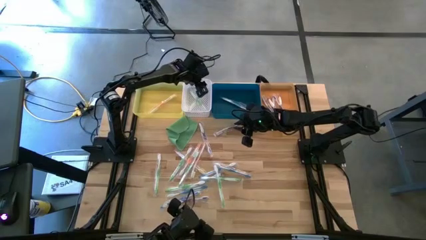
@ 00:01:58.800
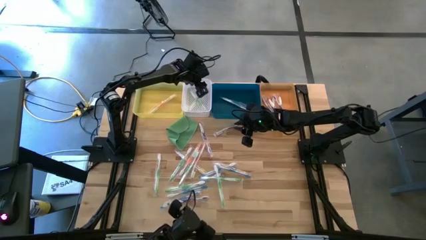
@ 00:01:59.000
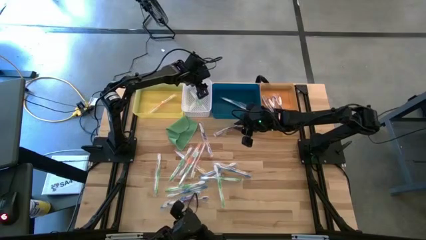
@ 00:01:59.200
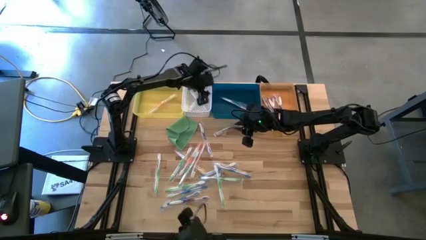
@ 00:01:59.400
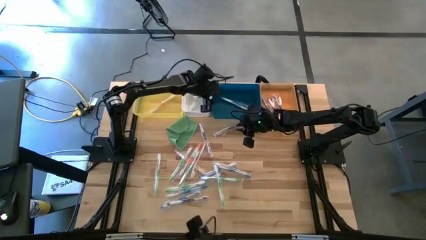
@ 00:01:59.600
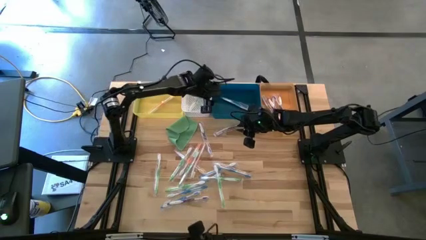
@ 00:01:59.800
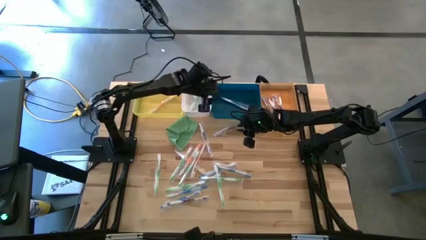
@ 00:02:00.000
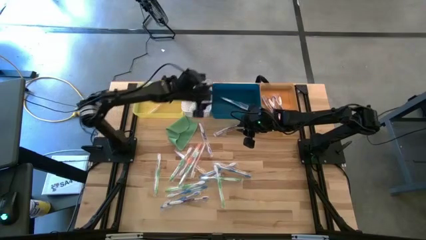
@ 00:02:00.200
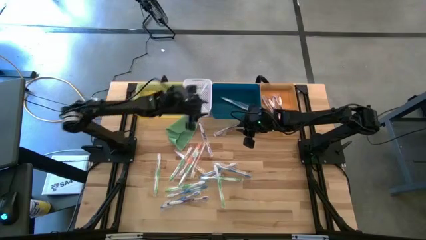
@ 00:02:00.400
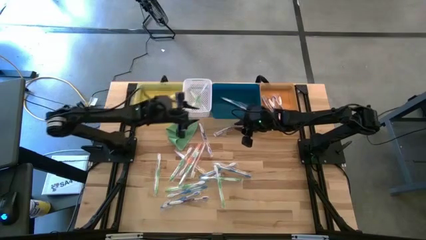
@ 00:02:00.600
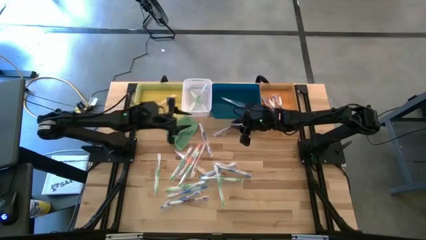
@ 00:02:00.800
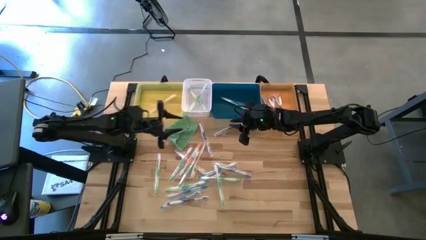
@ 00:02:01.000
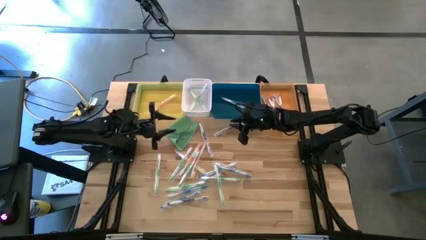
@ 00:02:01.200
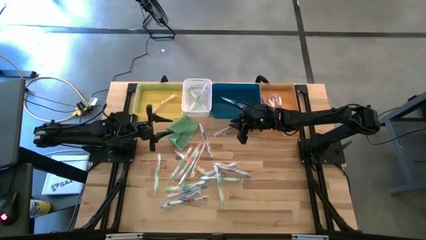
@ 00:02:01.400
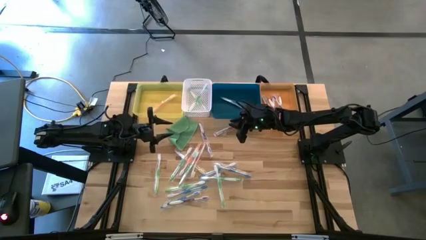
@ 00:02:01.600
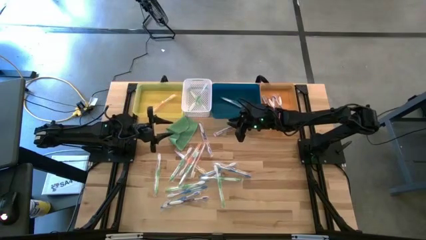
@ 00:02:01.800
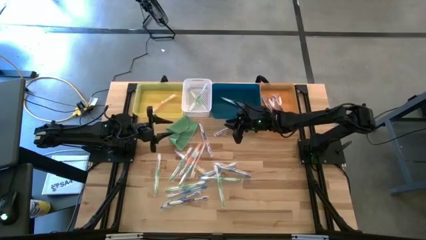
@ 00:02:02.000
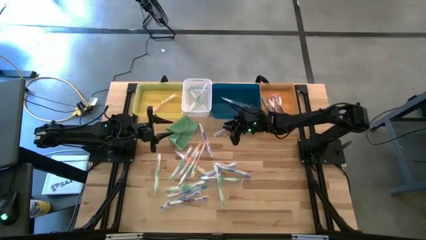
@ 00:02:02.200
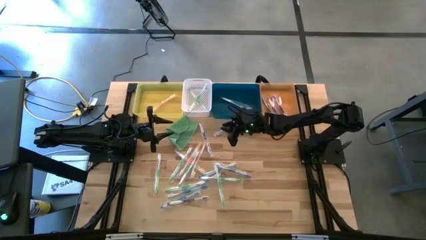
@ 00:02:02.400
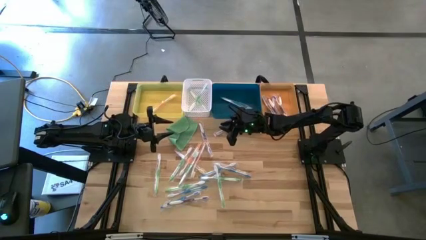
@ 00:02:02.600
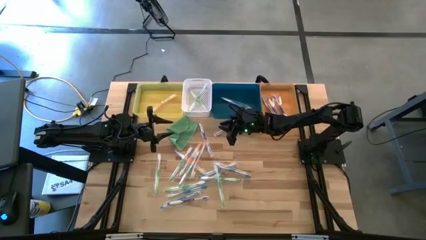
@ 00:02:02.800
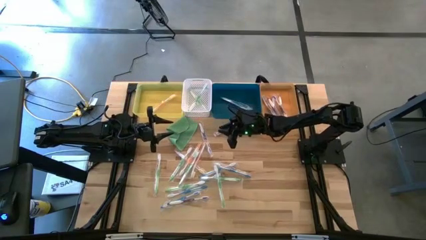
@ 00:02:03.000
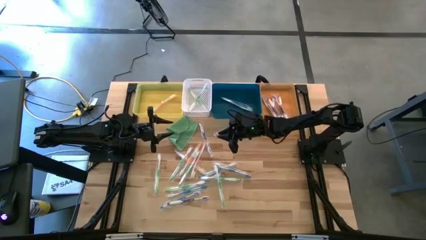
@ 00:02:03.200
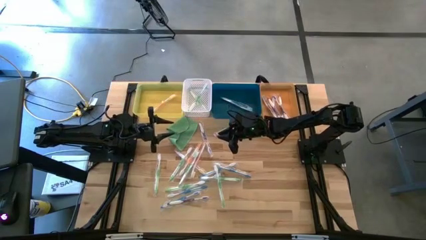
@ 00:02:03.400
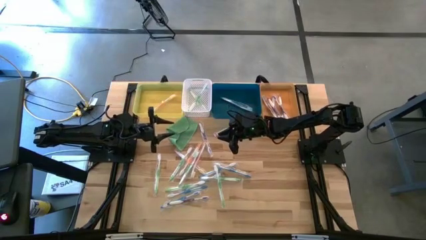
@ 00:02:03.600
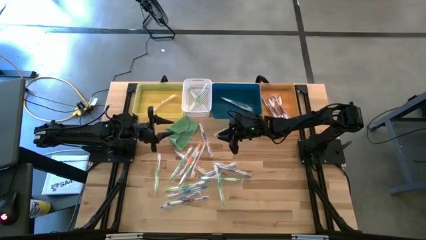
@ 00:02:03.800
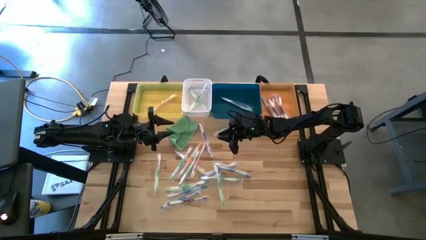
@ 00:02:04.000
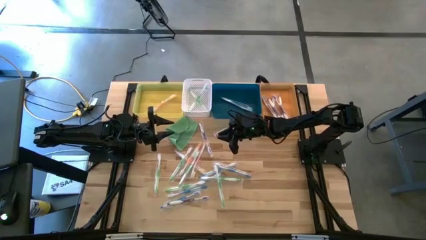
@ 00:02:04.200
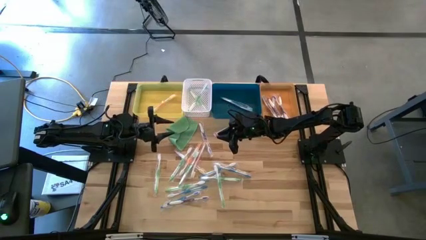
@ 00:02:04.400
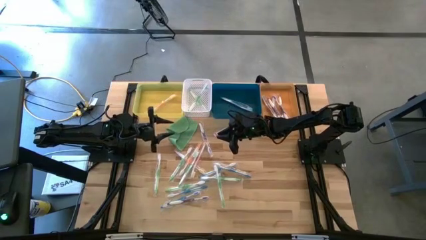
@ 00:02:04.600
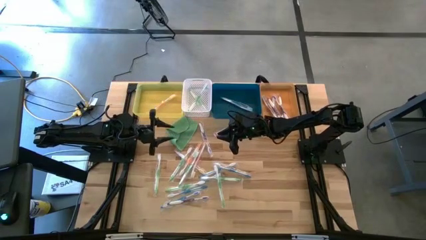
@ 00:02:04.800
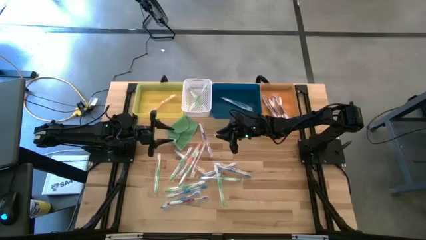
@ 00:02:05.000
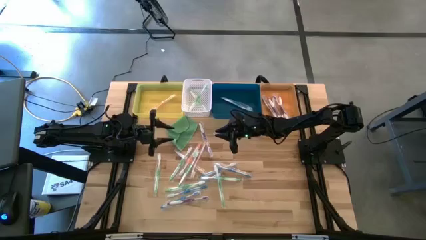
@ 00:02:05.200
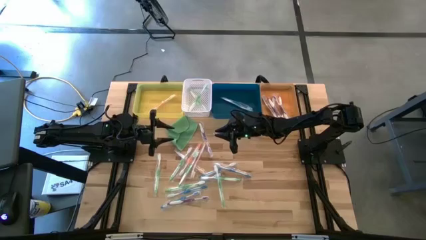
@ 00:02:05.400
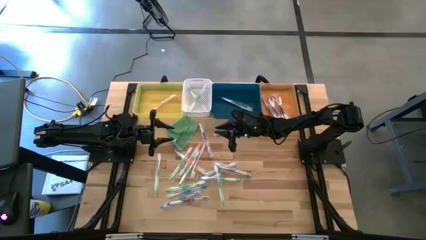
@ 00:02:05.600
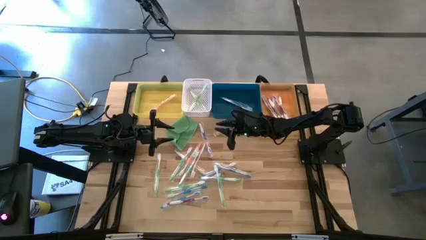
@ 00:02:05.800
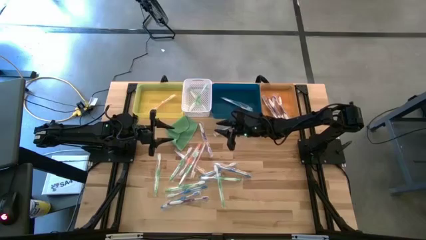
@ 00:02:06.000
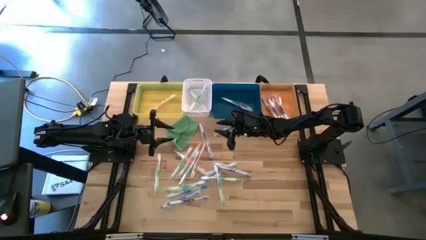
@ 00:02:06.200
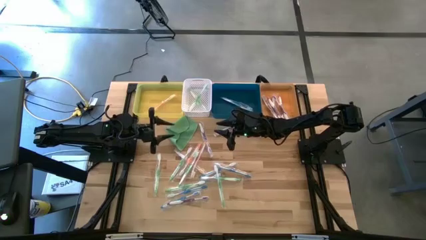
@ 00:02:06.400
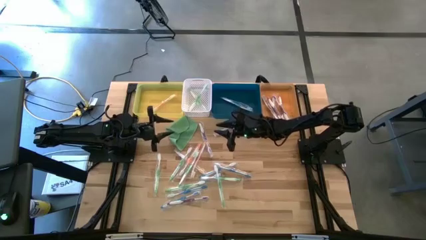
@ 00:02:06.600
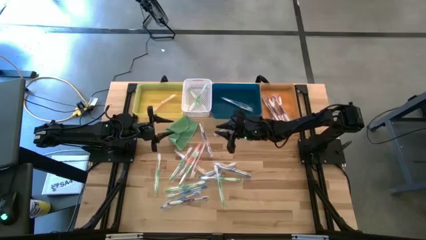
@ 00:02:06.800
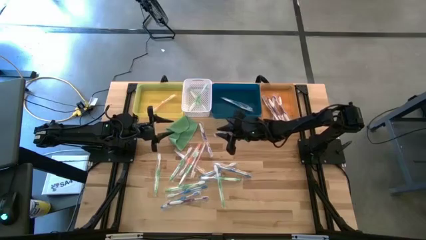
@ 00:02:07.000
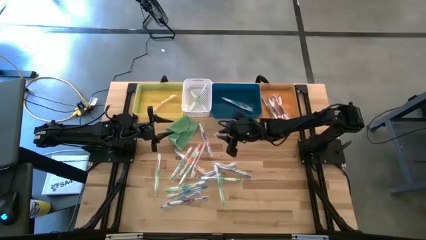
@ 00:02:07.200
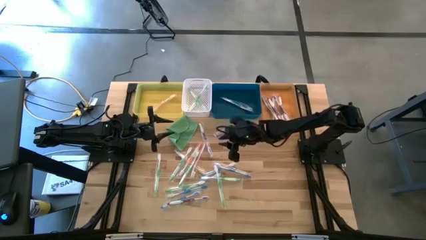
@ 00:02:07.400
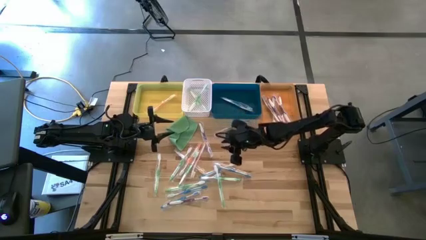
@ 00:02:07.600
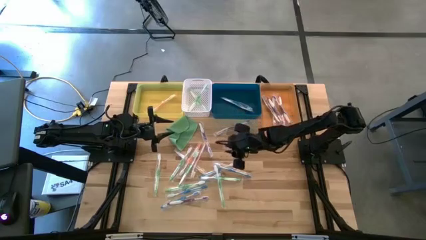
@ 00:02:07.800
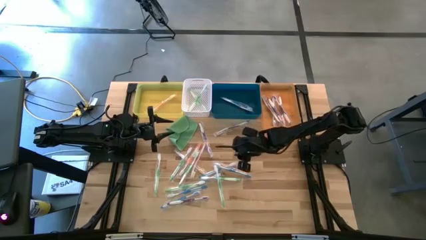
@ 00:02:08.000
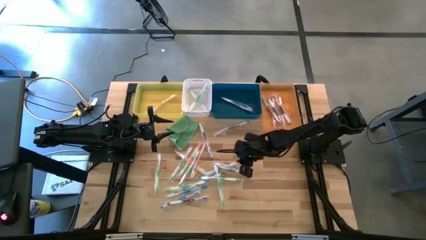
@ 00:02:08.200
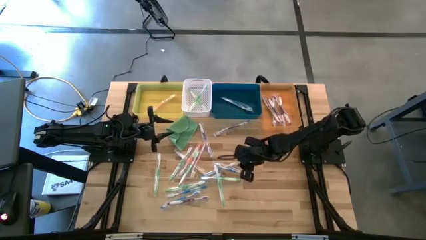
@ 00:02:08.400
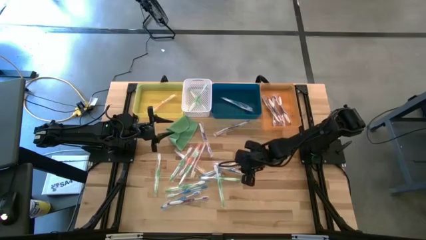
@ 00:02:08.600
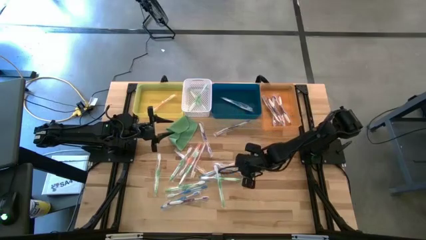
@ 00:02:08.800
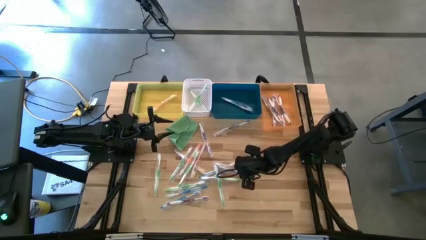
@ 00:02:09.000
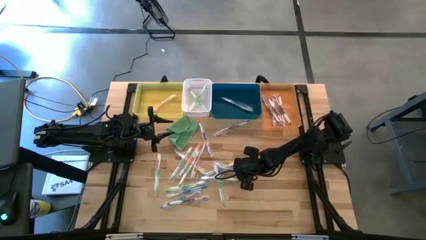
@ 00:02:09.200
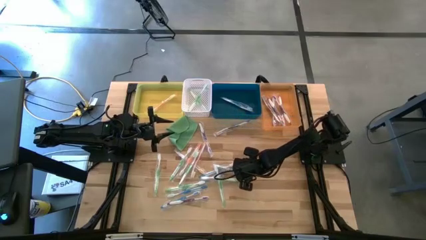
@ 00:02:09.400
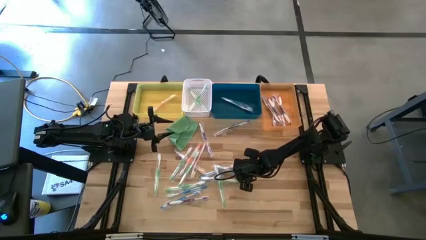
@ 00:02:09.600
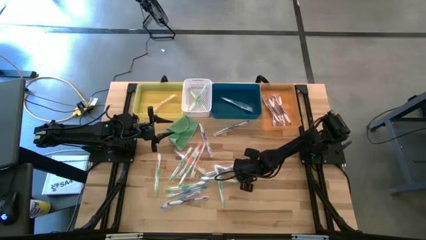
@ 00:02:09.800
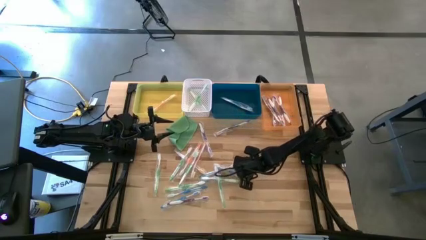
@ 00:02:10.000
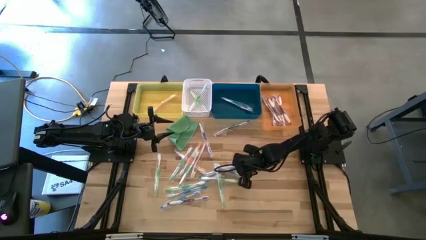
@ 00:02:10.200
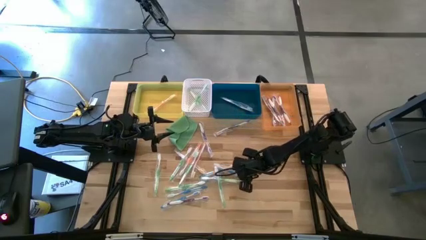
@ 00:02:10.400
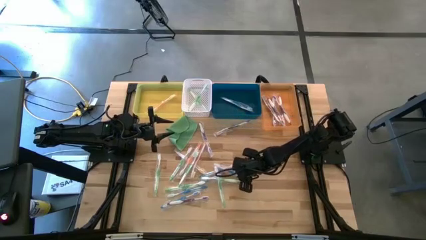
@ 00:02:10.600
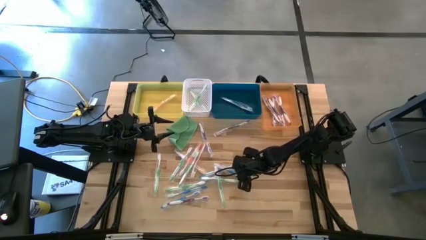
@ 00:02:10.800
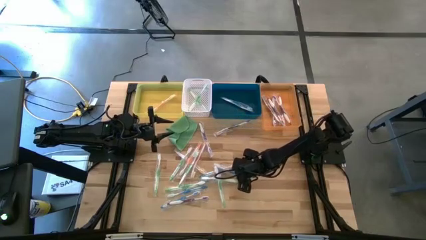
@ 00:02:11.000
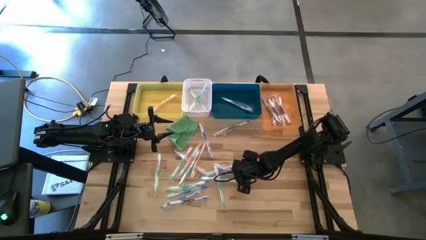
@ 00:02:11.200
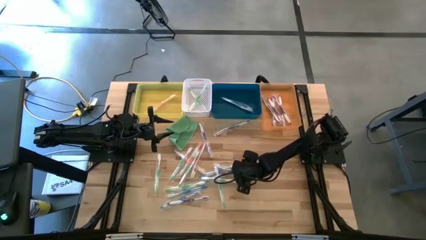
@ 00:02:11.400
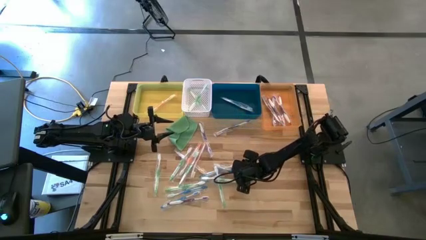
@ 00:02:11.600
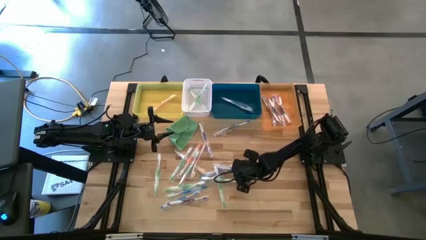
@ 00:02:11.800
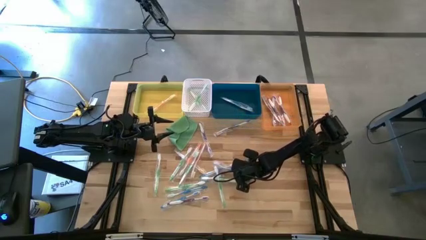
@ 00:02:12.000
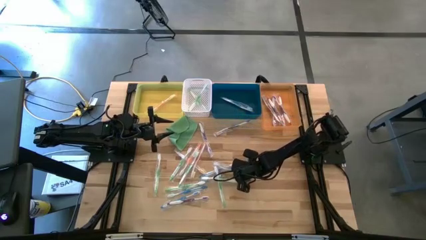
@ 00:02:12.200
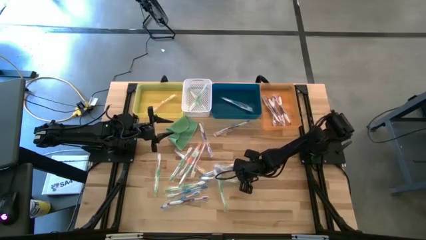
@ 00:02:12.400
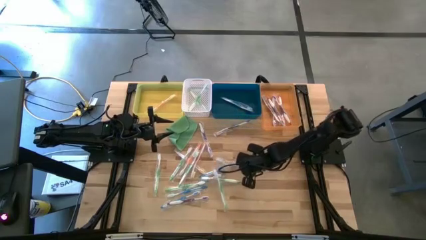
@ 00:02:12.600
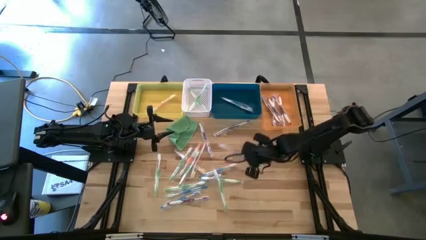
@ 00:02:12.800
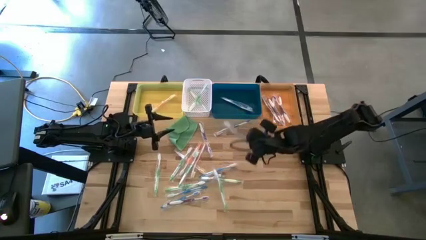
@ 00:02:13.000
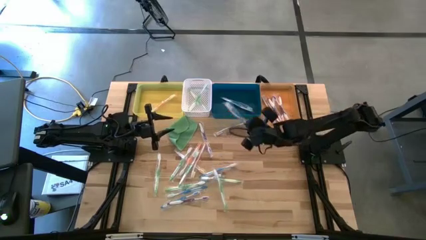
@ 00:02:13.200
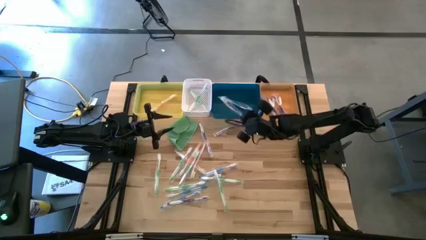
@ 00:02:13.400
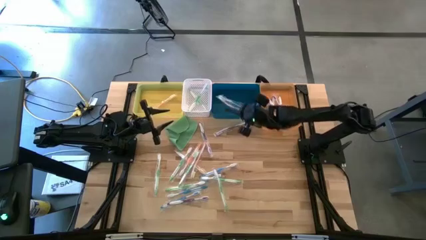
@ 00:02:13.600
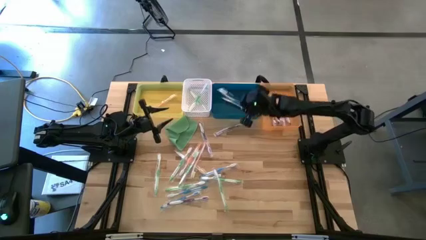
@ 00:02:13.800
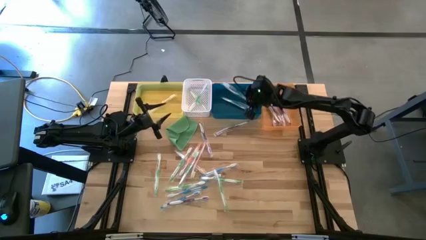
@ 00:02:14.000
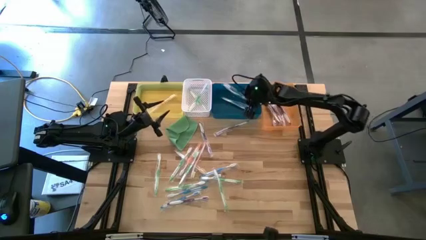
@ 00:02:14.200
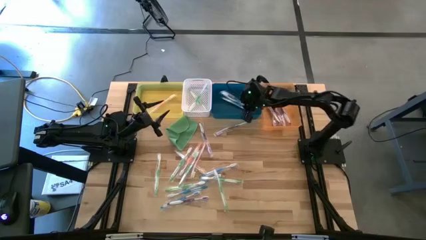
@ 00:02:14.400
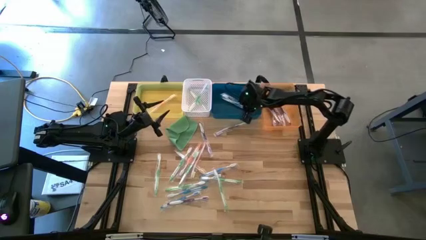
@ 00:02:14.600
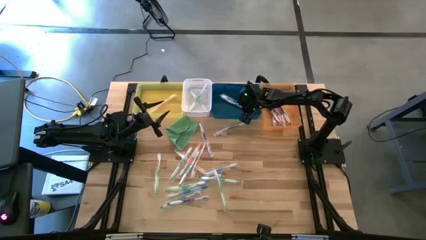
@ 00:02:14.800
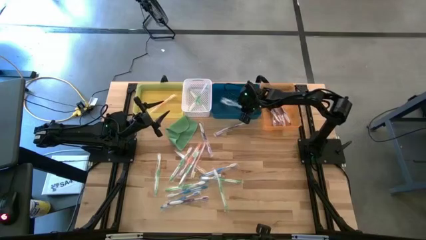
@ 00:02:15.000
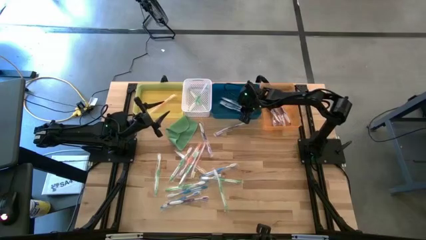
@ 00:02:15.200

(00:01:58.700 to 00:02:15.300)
Task: Pick & Place Toothbrushes
Put the blue toothbrush into the blue bin
